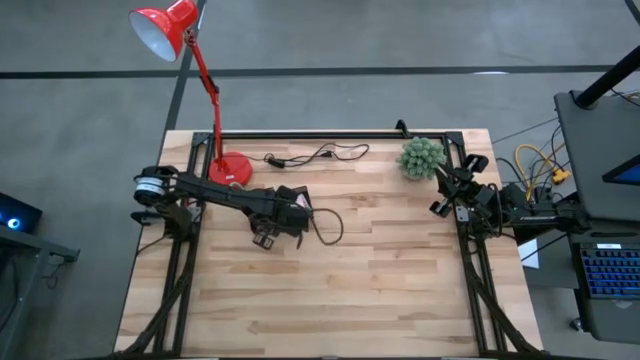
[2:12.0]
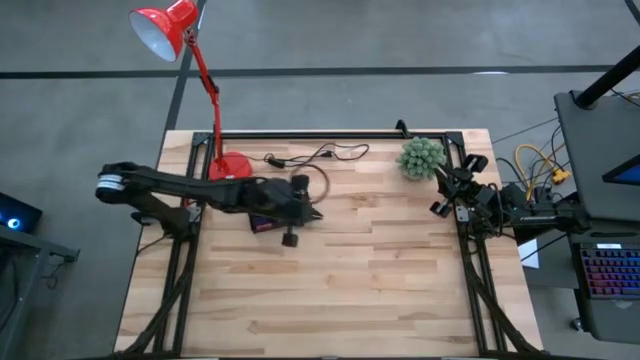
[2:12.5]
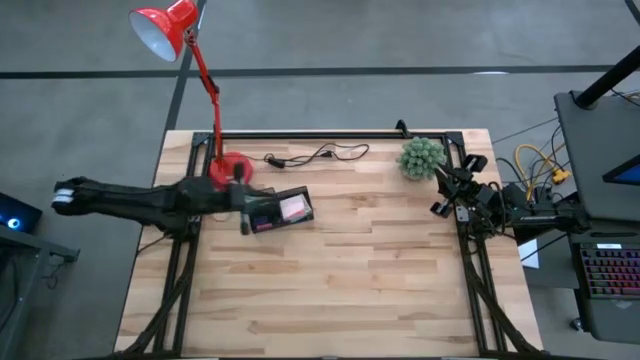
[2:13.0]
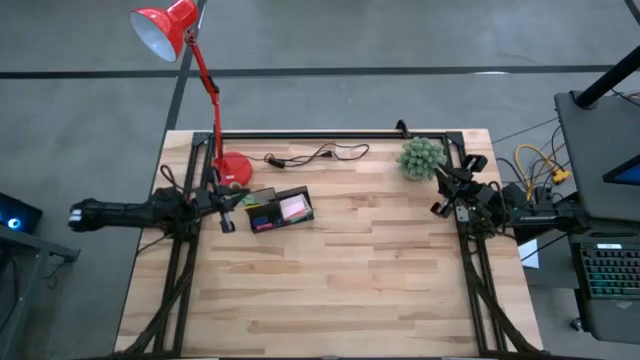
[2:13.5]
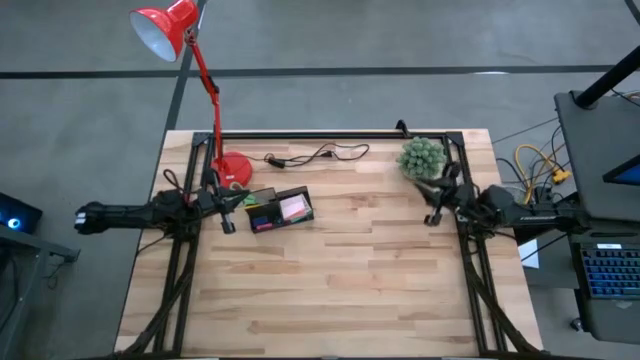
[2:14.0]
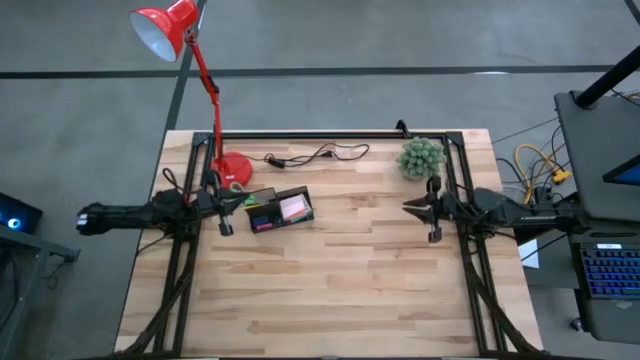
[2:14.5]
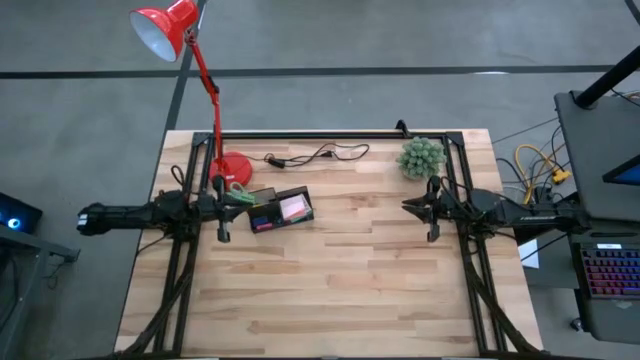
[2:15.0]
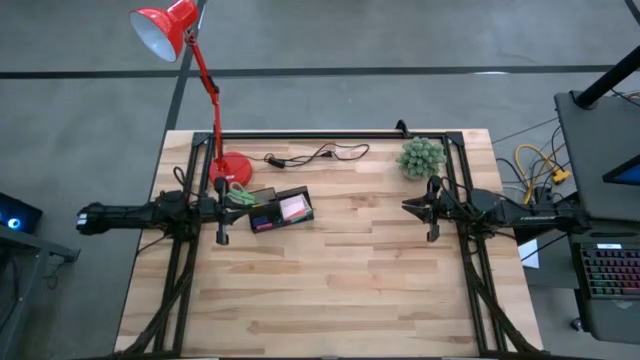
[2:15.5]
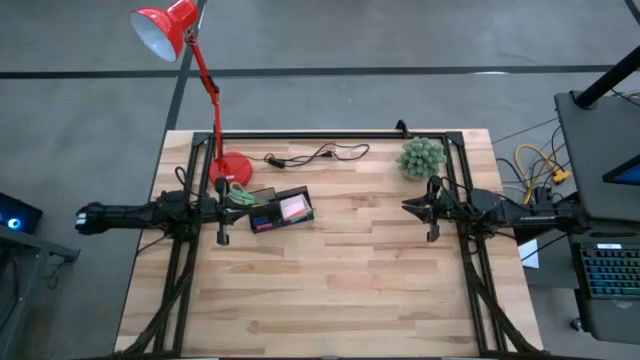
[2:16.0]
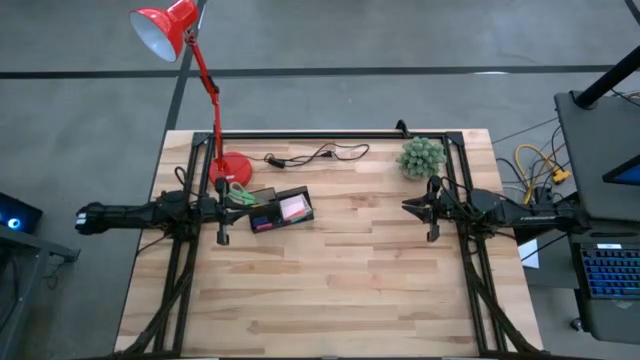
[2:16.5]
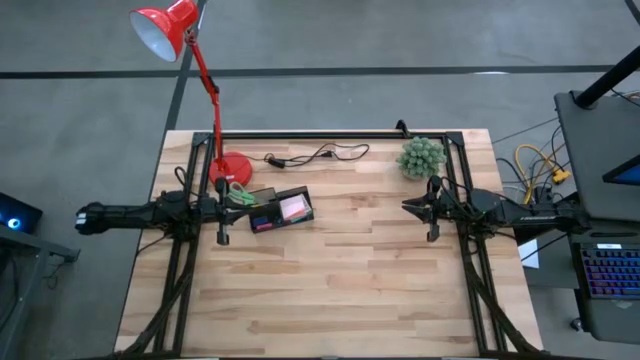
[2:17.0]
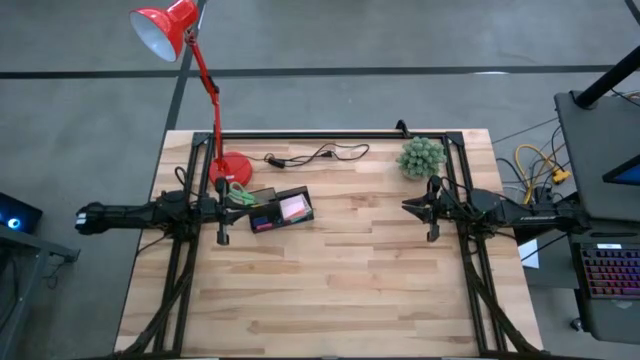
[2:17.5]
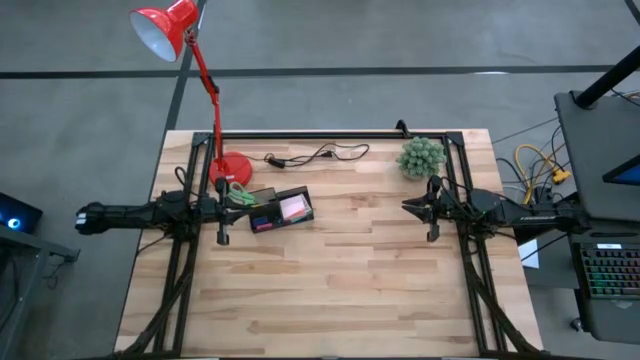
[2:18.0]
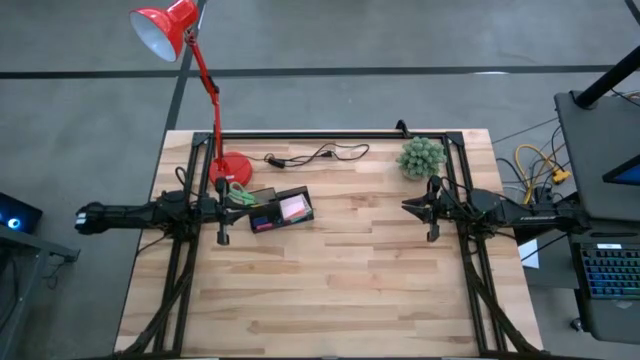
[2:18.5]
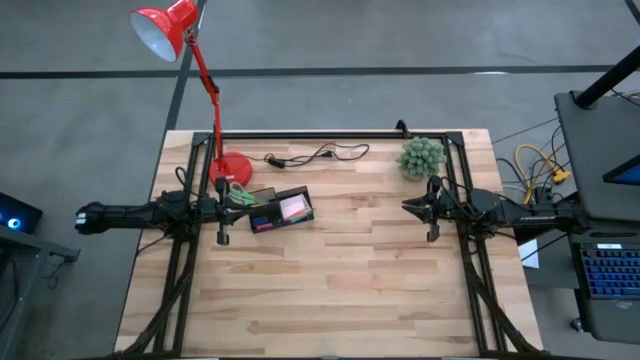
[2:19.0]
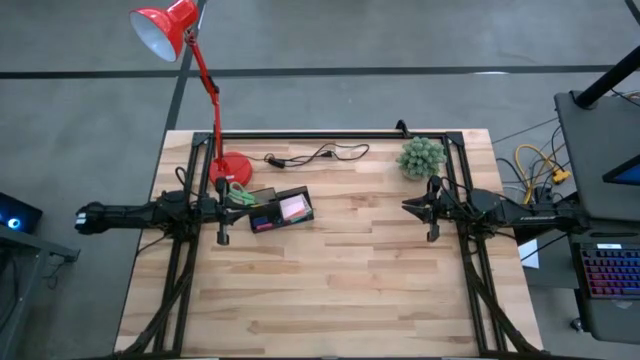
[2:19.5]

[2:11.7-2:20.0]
Task: Pick and place office supplies into organizer
Return to Home Position

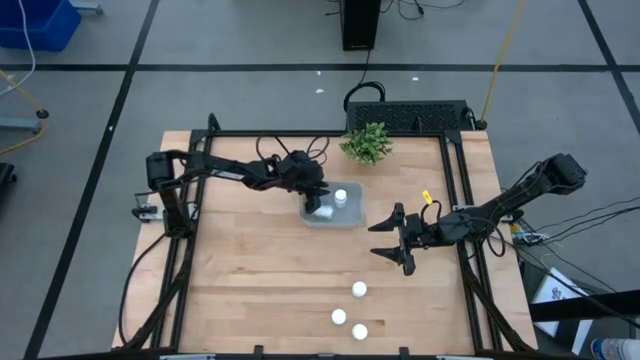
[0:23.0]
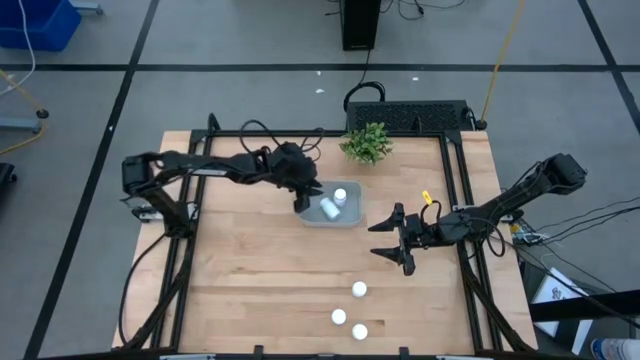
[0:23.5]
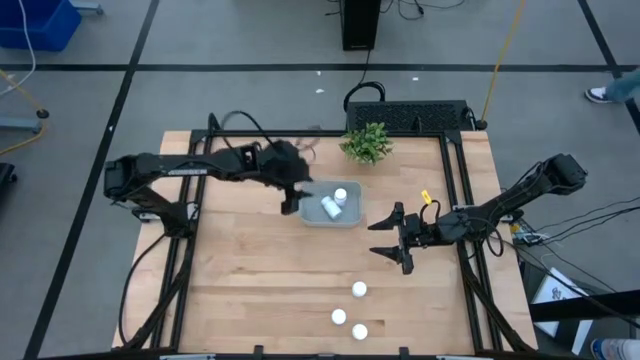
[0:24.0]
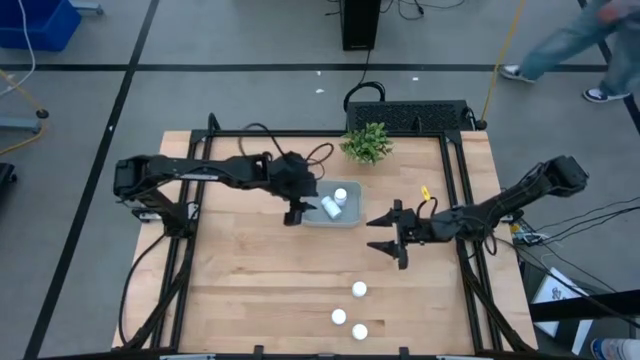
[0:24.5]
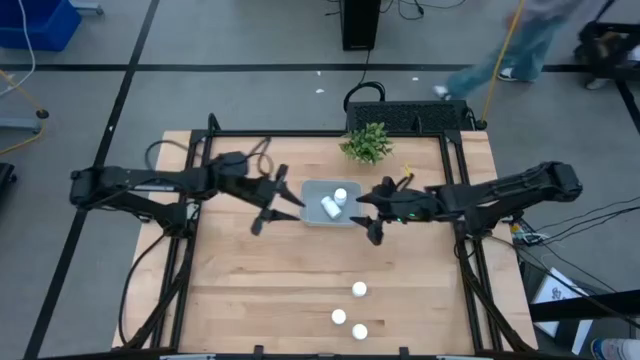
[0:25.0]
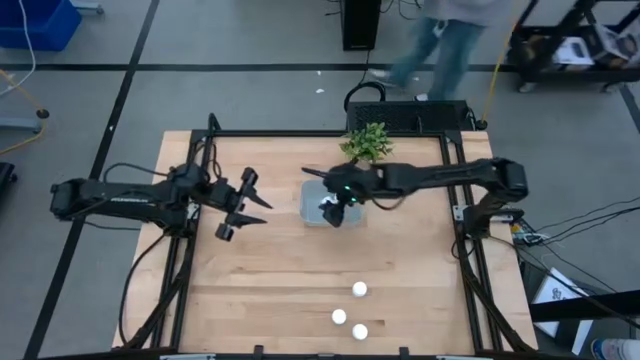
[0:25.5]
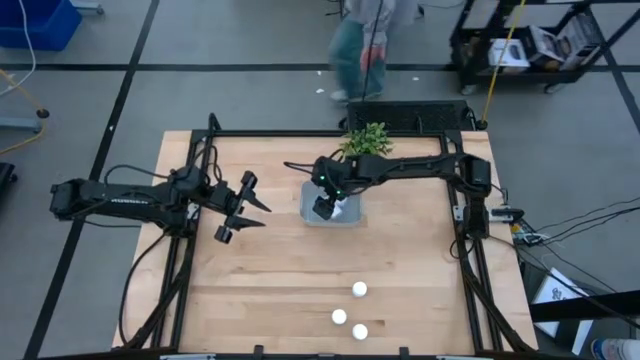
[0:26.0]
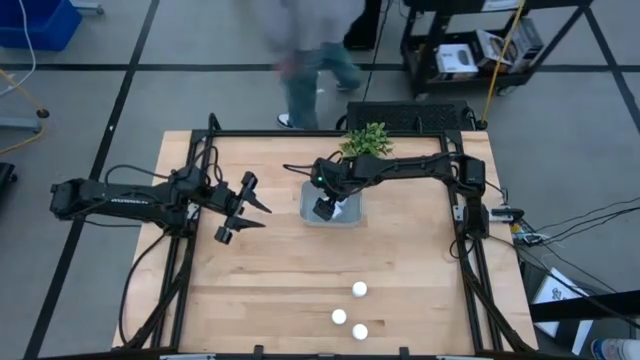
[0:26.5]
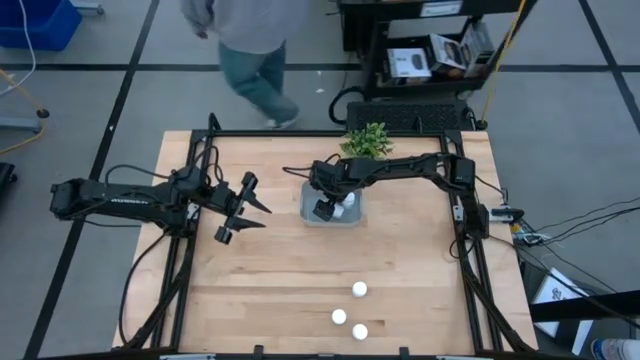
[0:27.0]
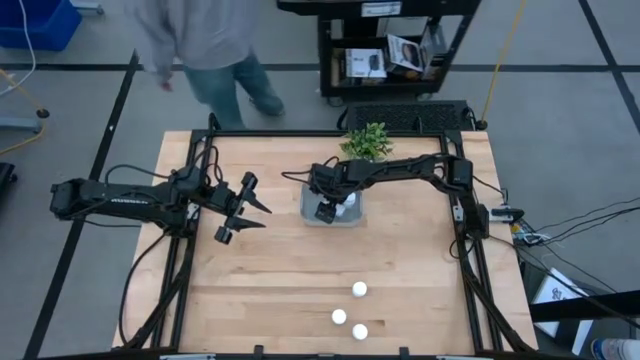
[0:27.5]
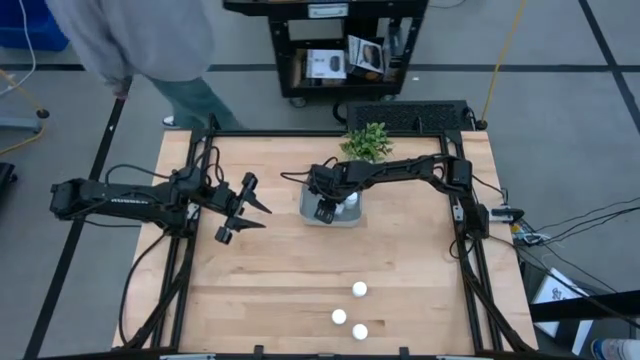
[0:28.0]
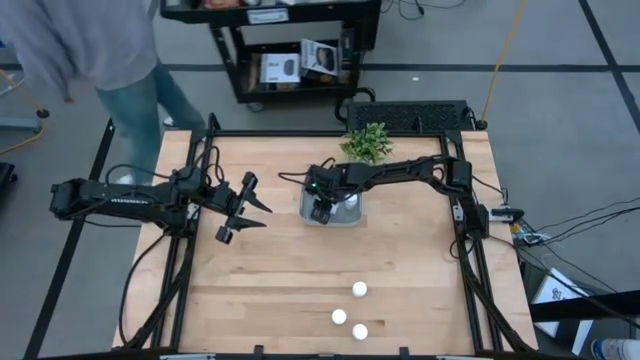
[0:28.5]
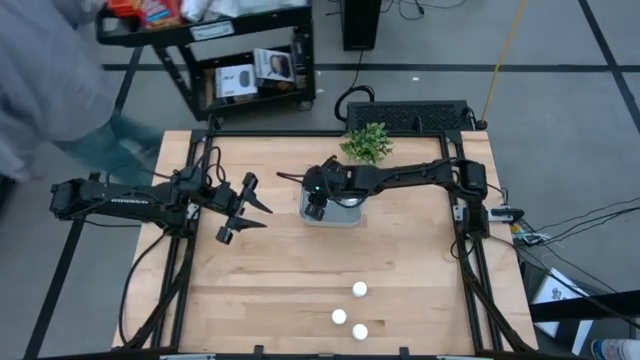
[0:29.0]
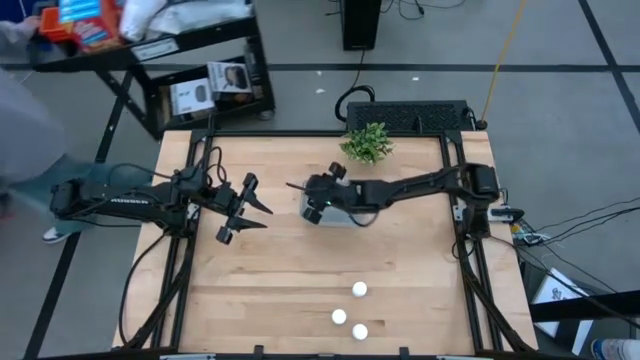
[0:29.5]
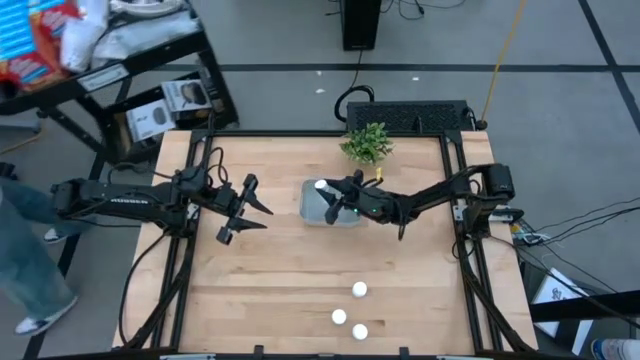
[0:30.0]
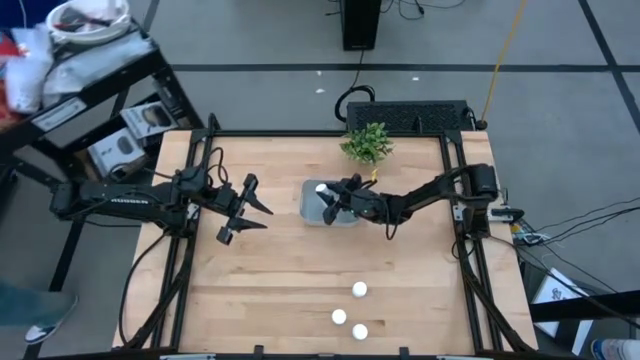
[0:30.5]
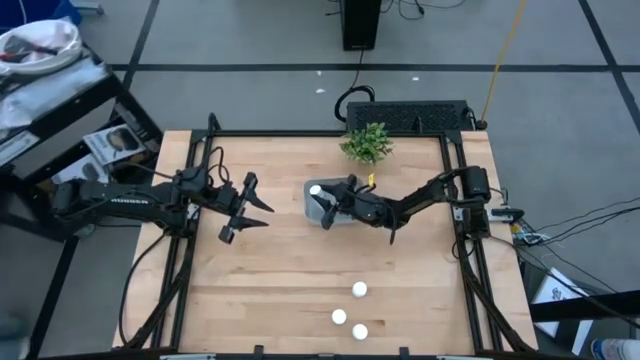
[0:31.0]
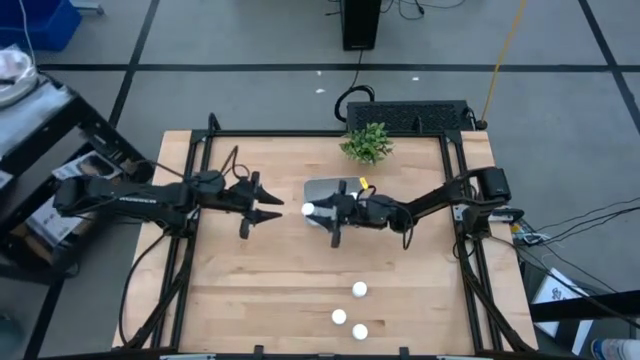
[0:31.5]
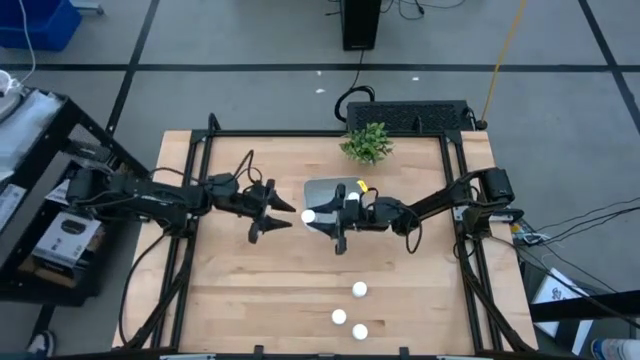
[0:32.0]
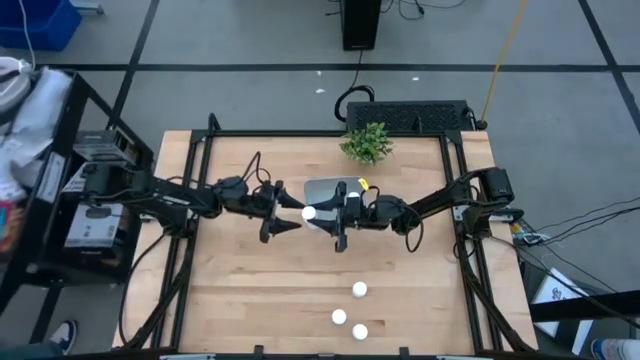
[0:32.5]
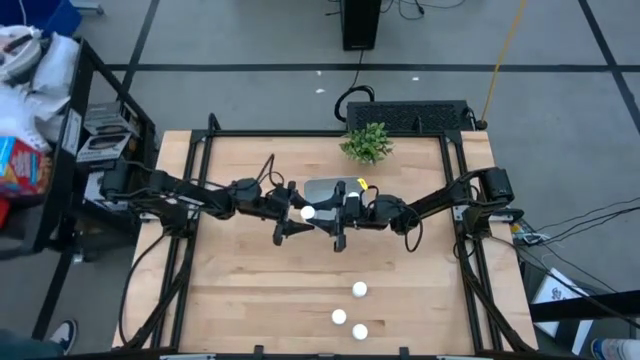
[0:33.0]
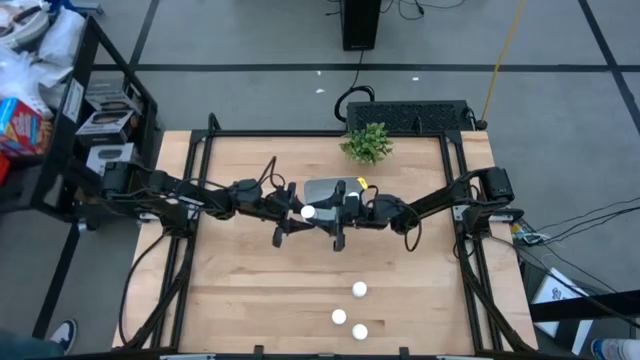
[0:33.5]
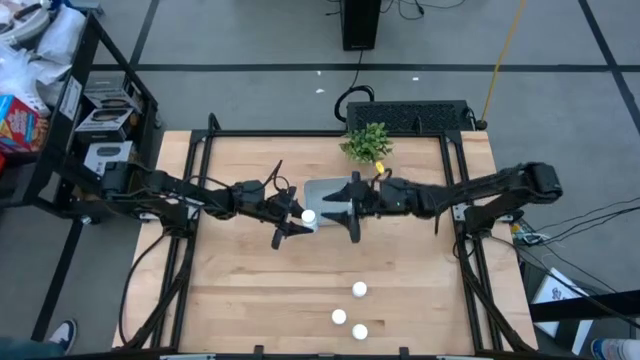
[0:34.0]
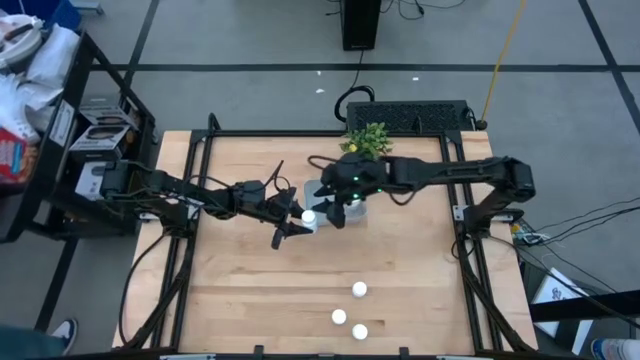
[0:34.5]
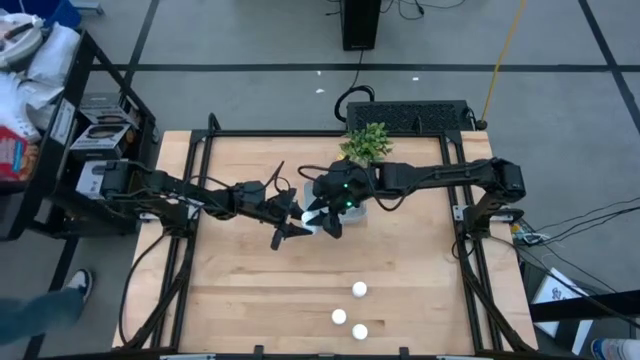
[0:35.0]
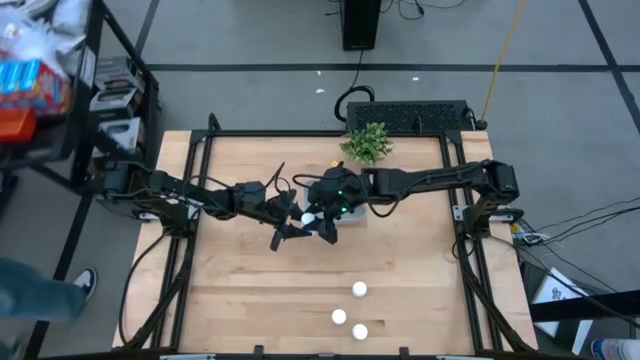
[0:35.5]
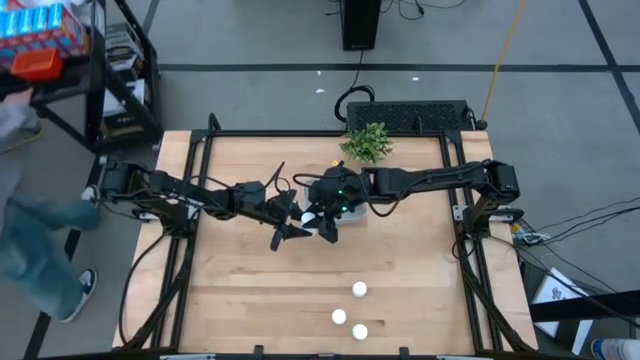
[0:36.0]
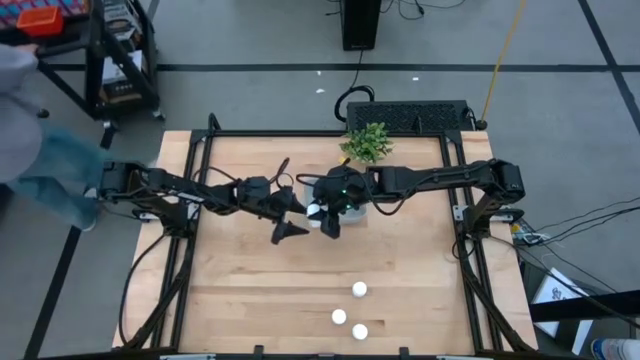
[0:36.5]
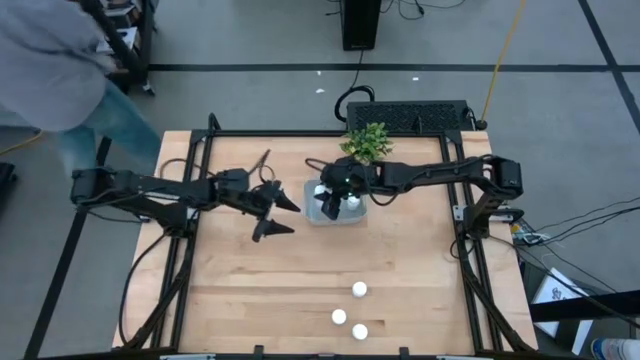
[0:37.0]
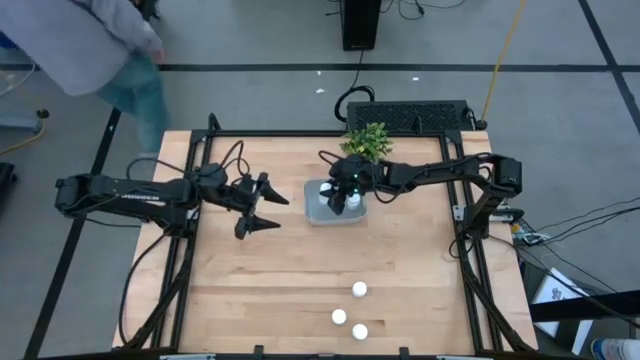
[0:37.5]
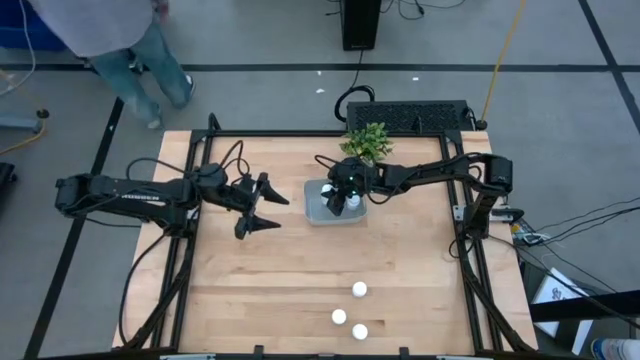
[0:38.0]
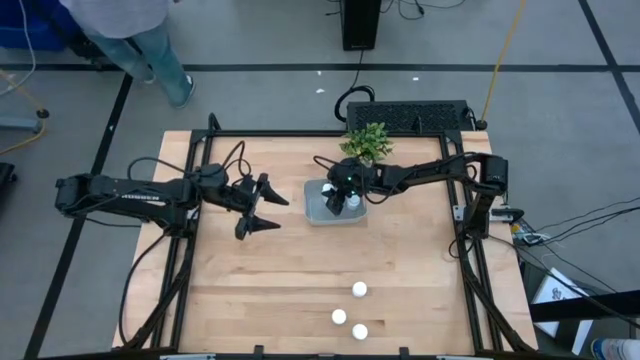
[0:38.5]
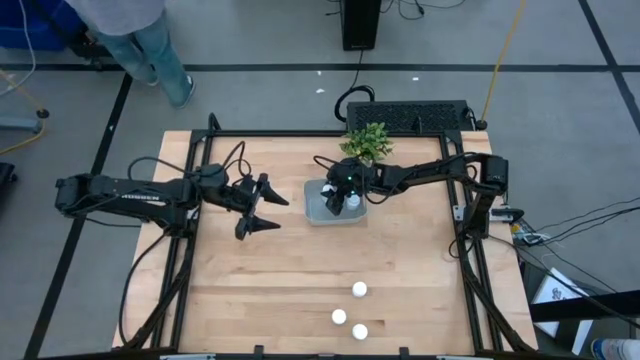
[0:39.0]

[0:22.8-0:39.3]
Task: Pick and place pill bottles into a basket
Put the white pill bottle into the gray bin
